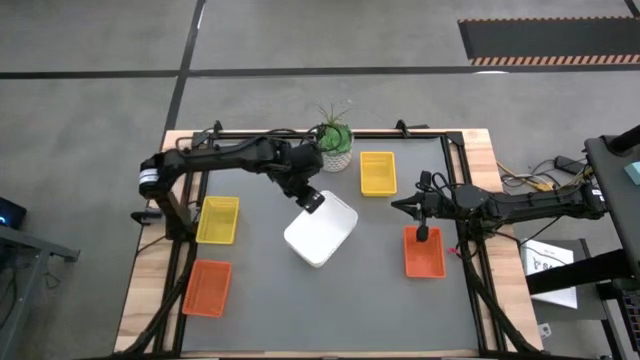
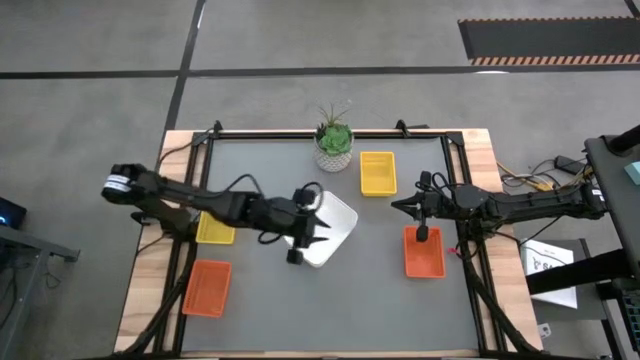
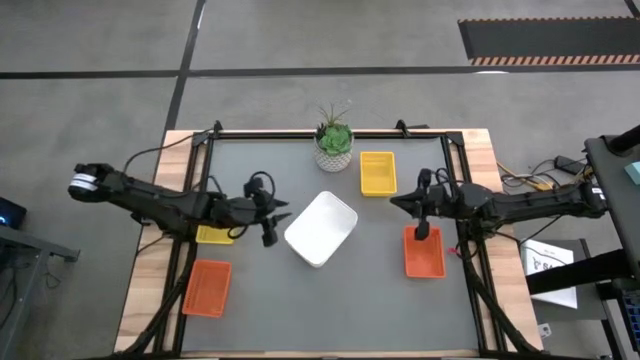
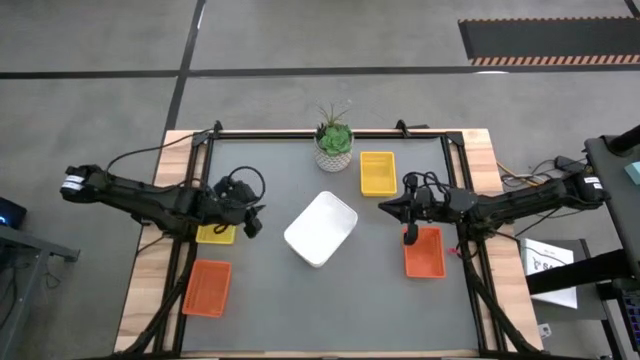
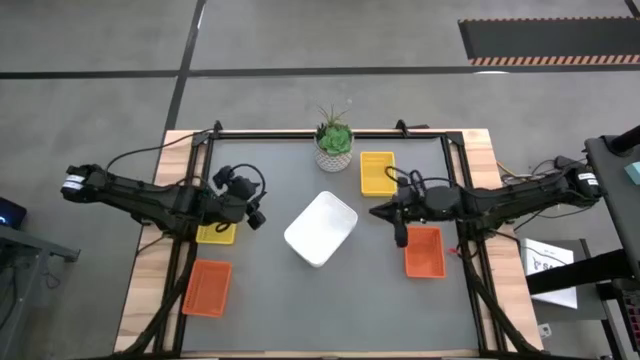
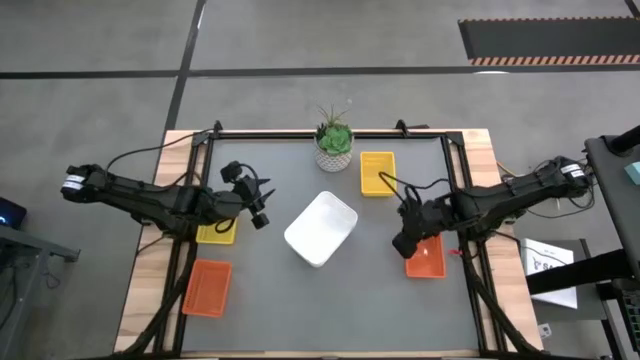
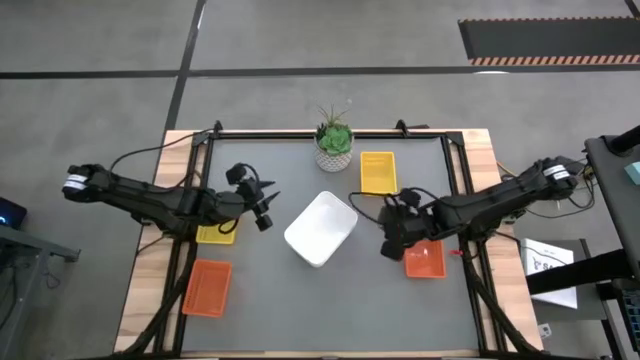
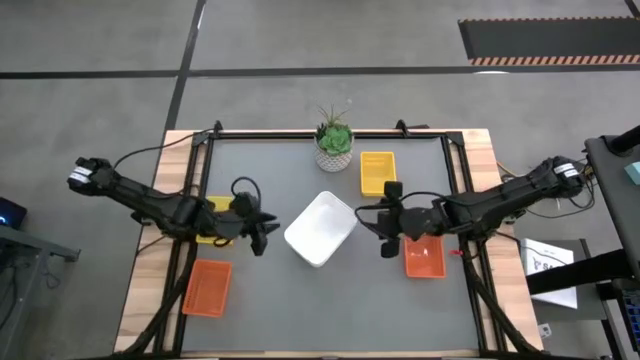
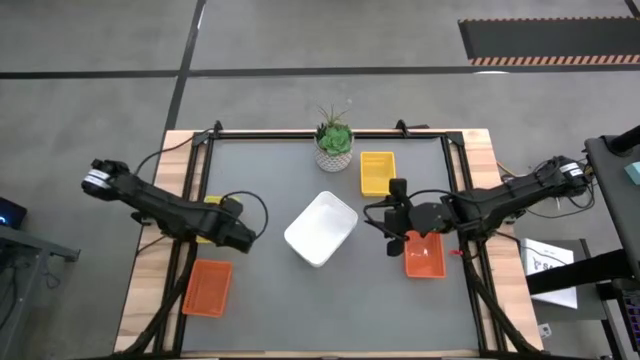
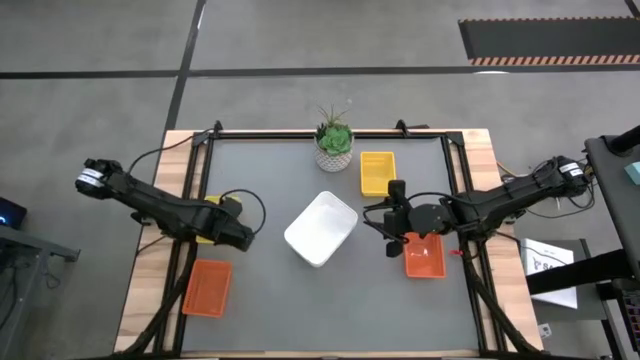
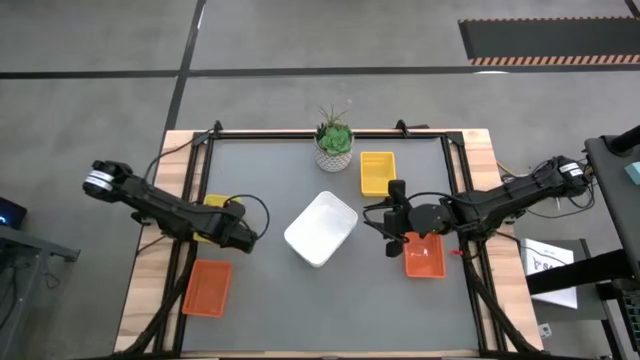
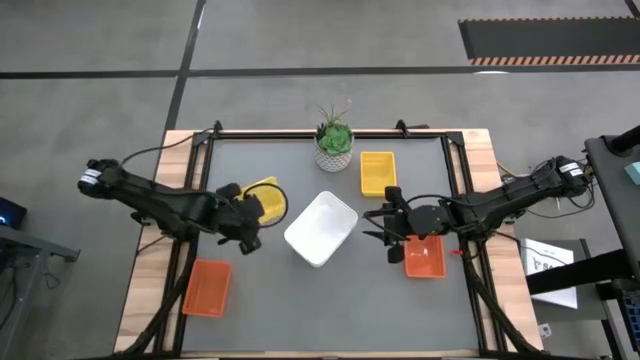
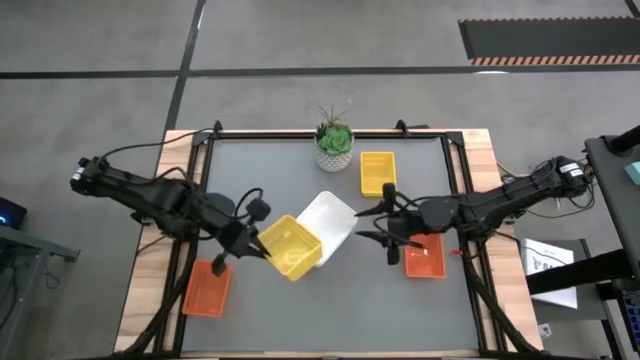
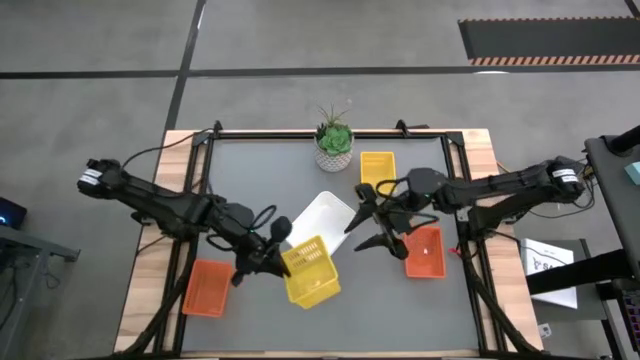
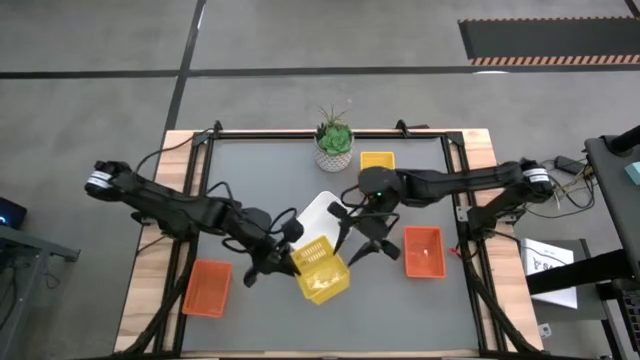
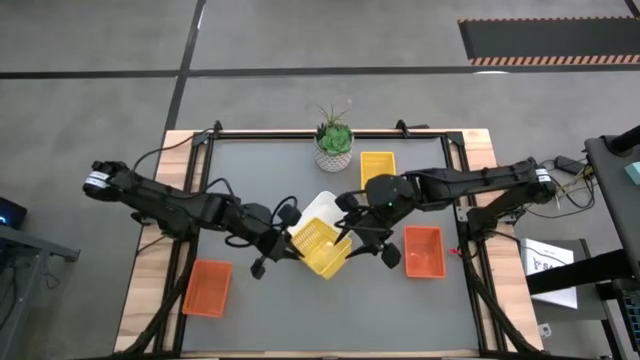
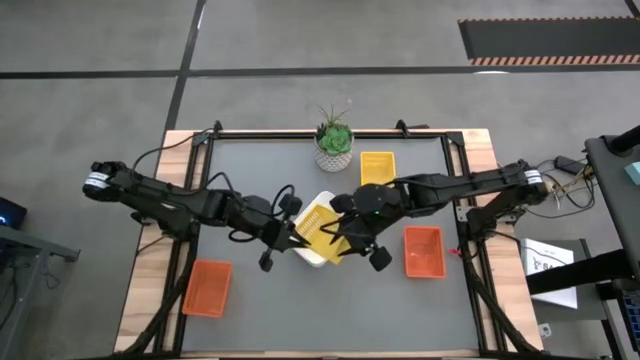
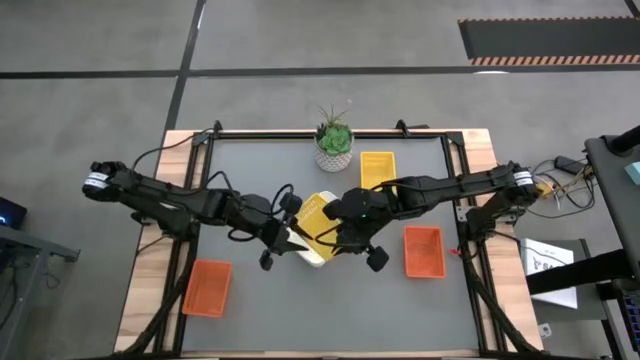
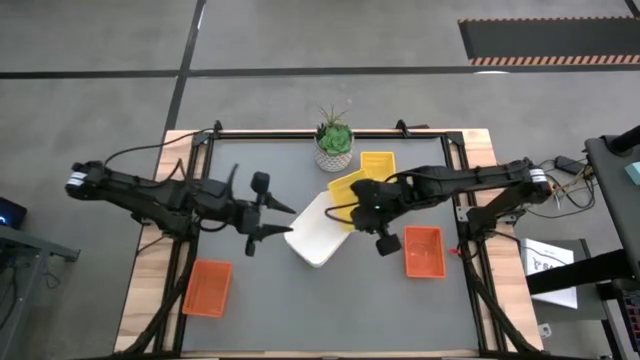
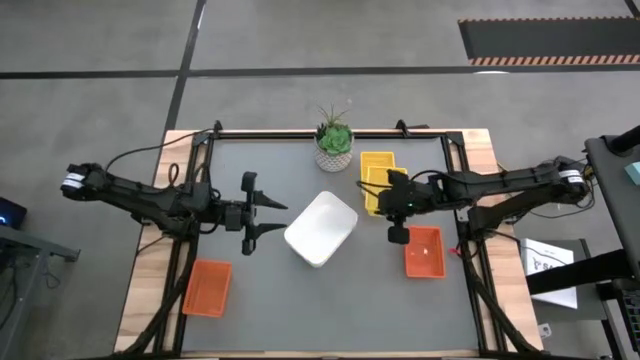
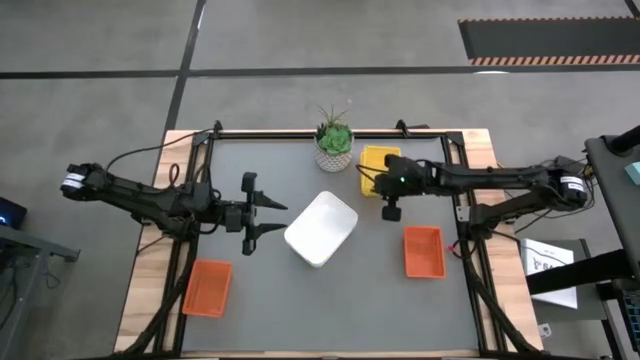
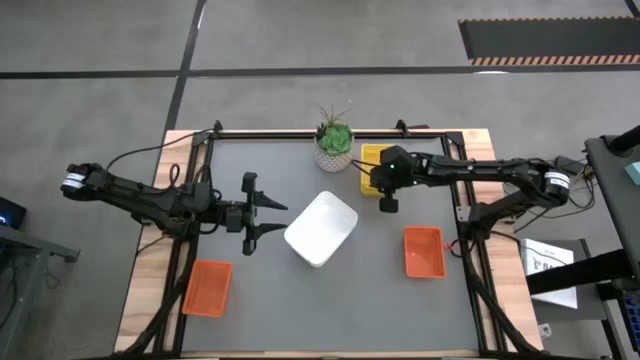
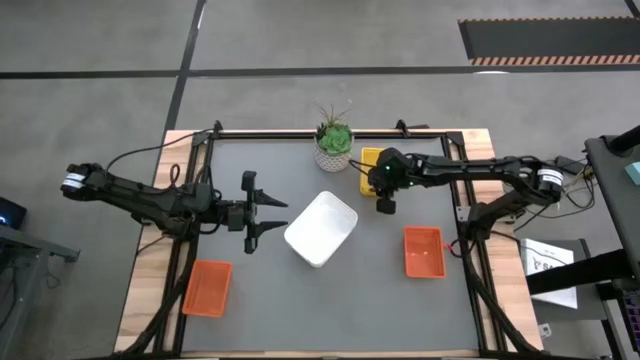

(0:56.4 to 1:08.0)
Stack the left yellow bin on the right yellow bin

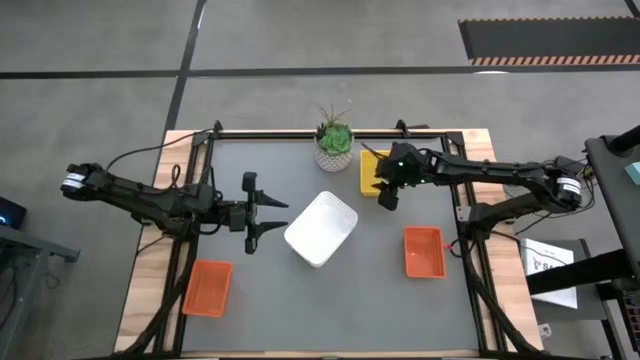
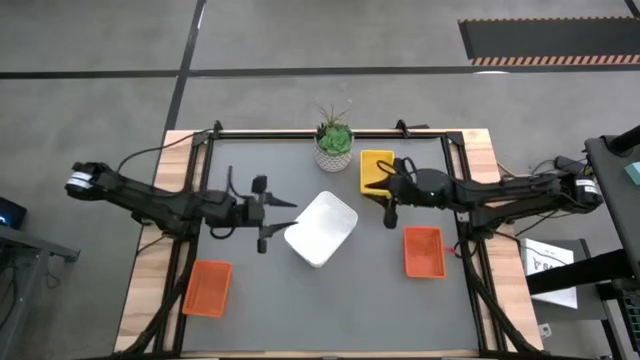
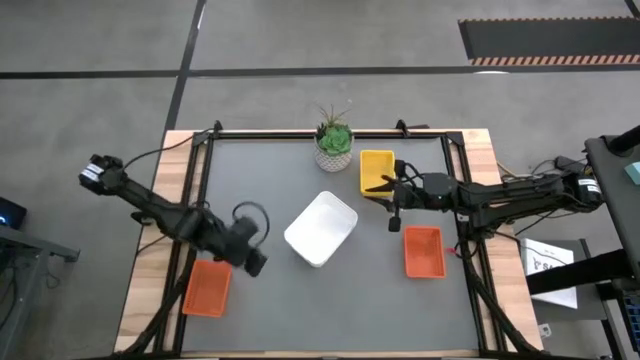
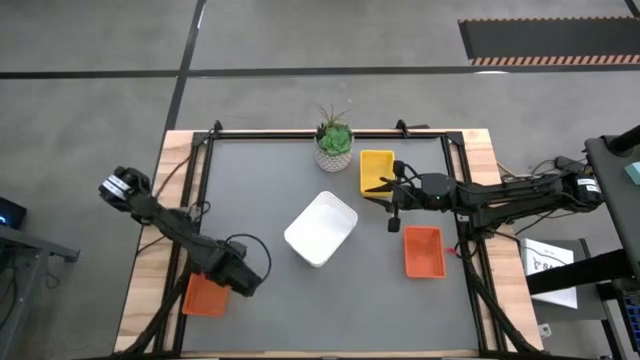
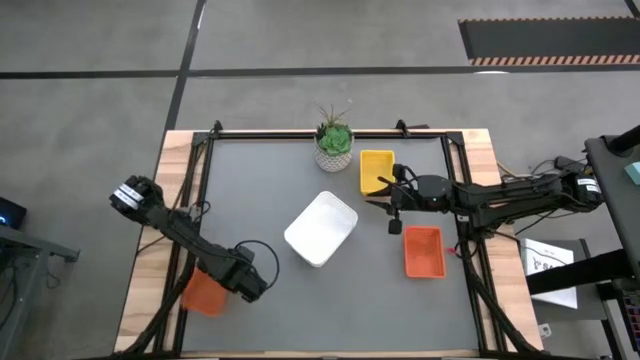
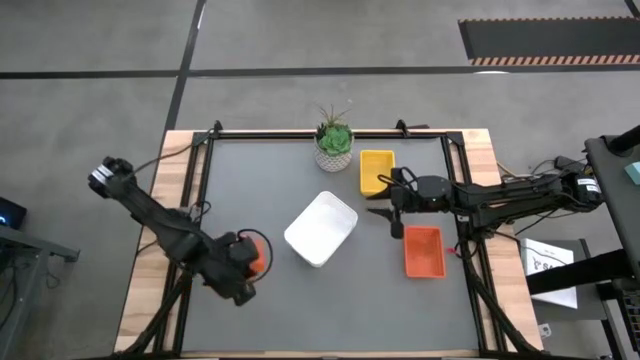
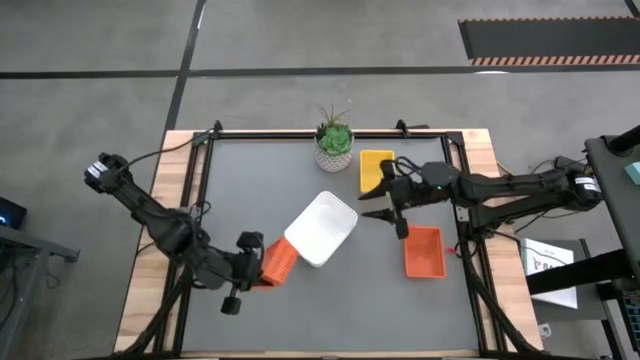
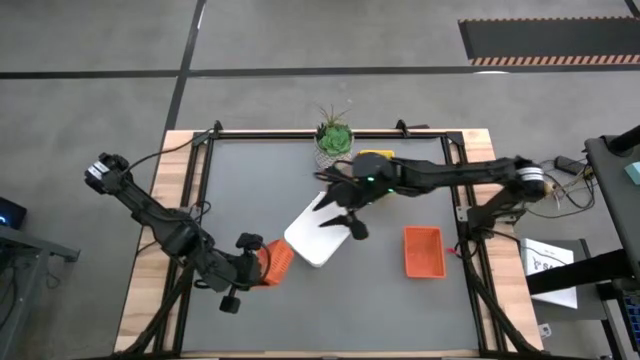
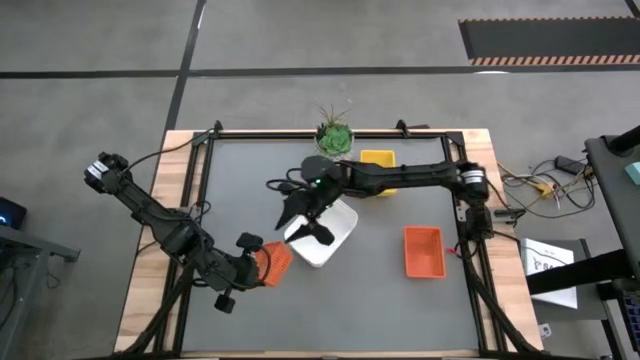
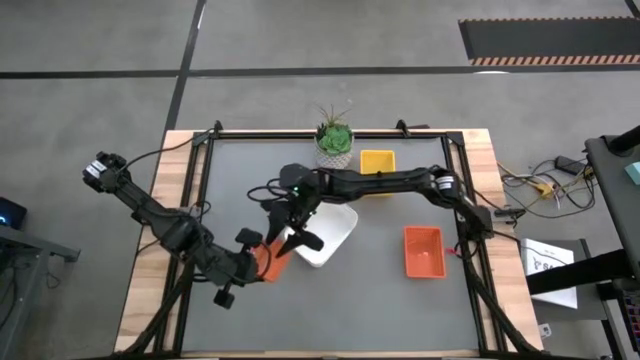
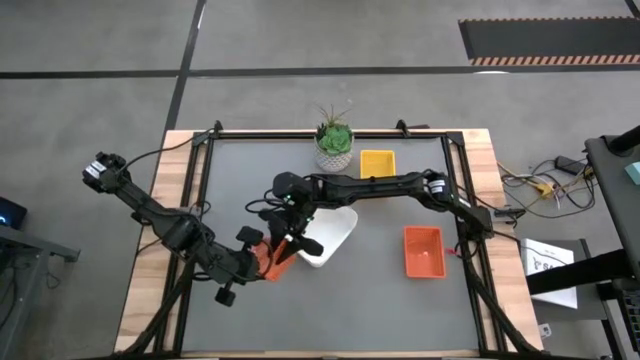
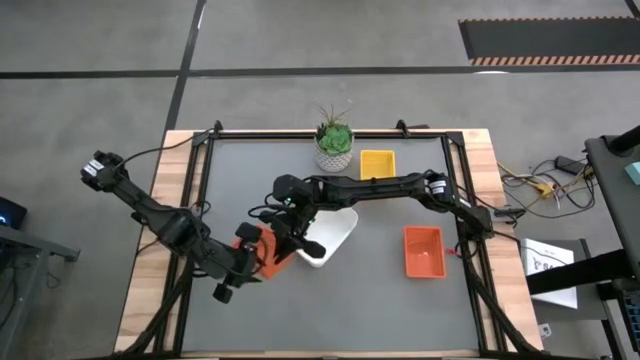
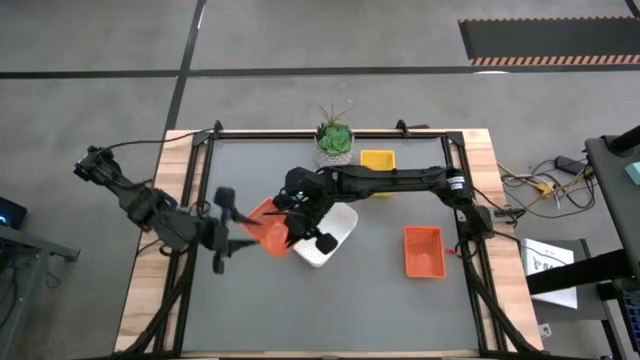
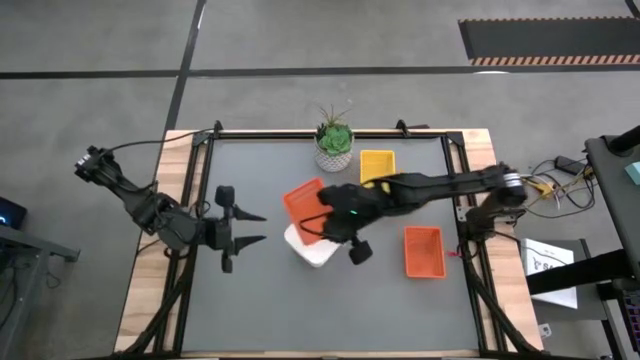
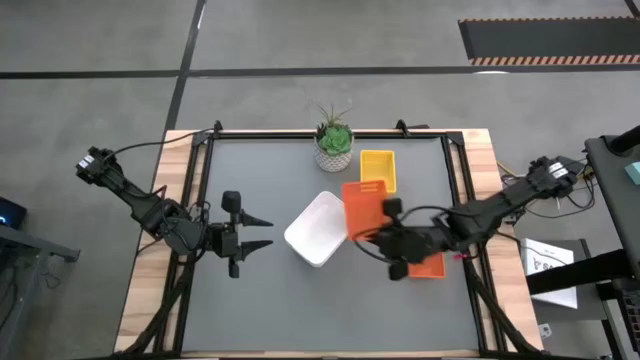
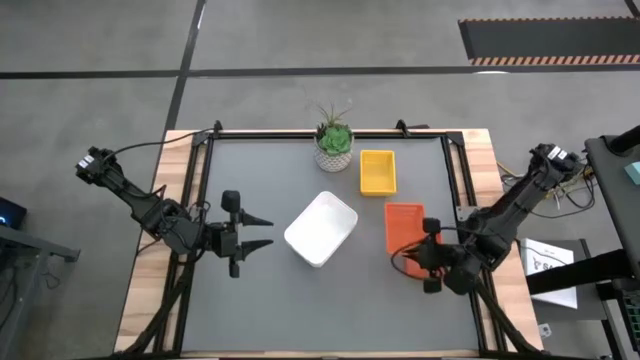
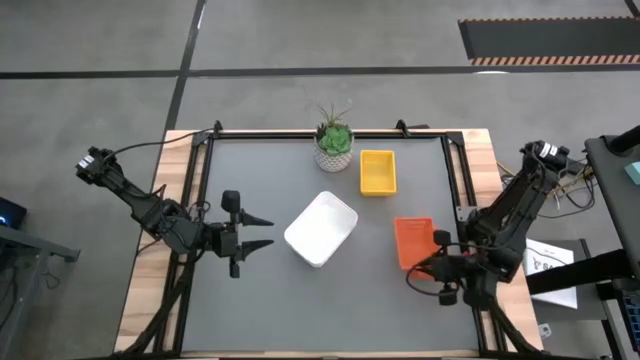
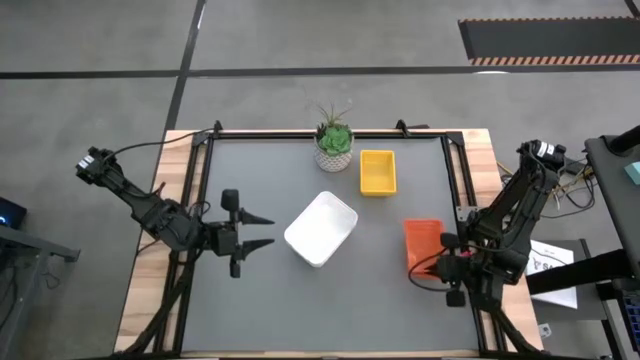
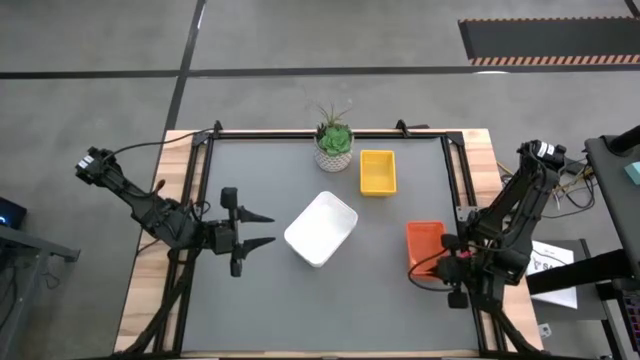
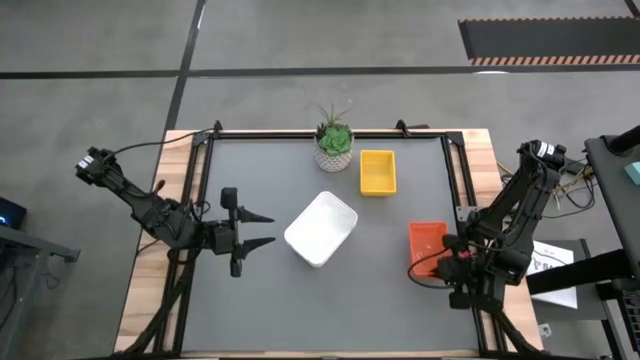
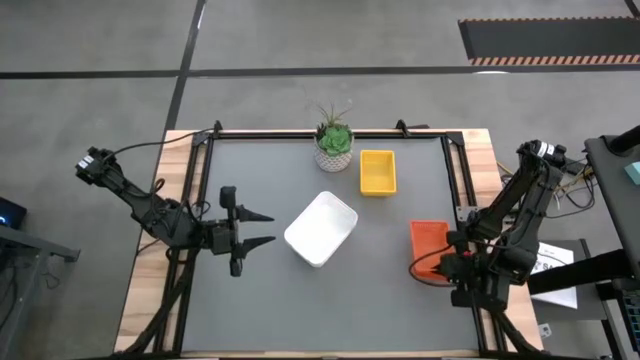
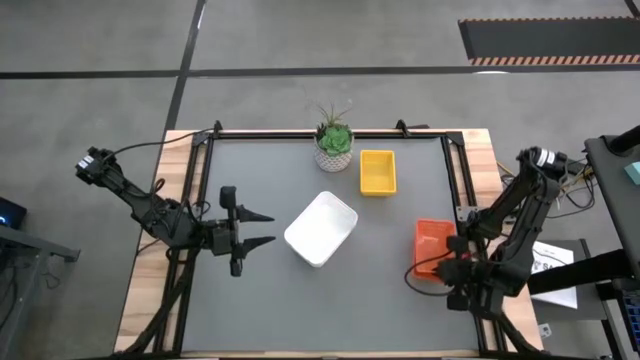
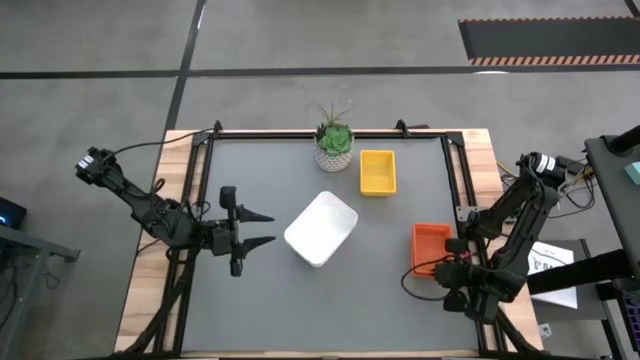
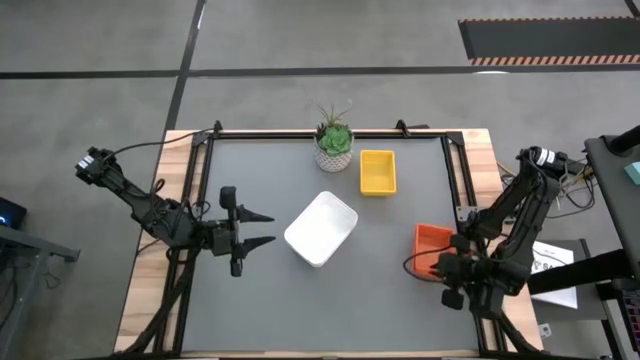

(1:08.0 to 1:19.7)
Stack the left orange bin on the right orange bin
